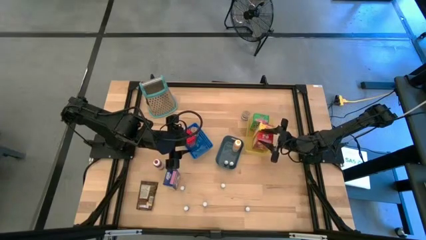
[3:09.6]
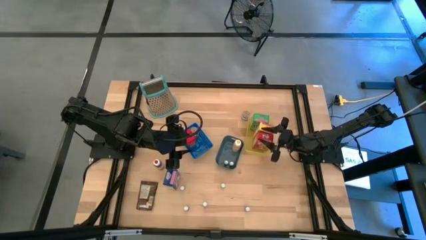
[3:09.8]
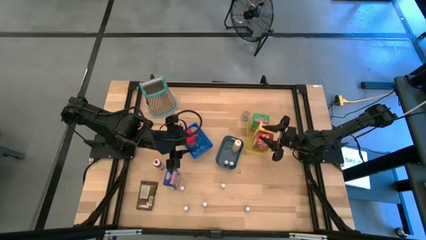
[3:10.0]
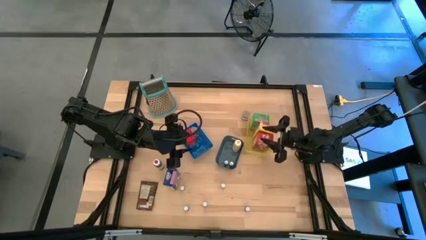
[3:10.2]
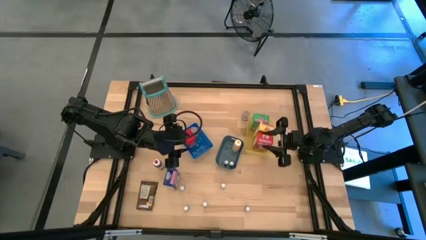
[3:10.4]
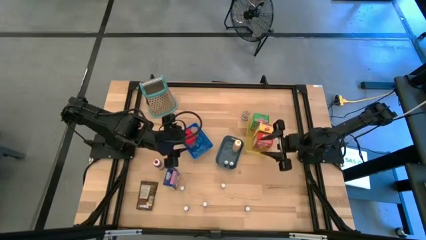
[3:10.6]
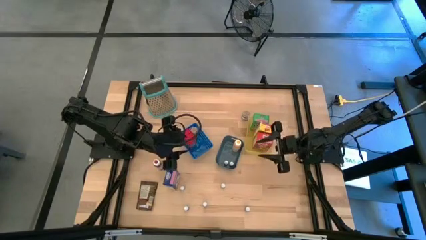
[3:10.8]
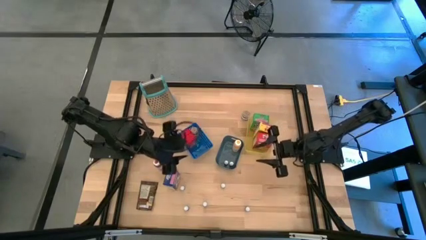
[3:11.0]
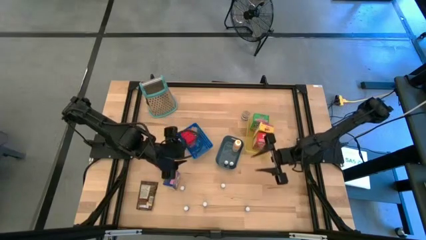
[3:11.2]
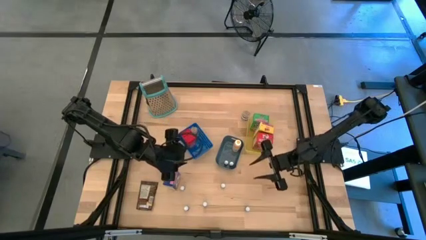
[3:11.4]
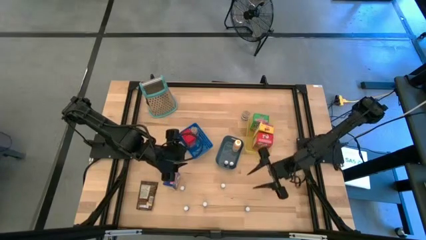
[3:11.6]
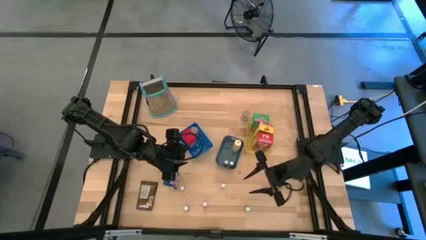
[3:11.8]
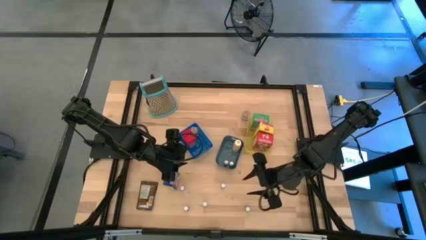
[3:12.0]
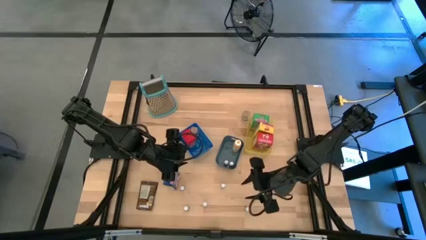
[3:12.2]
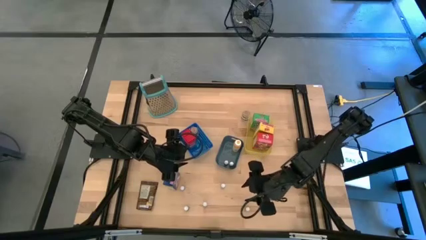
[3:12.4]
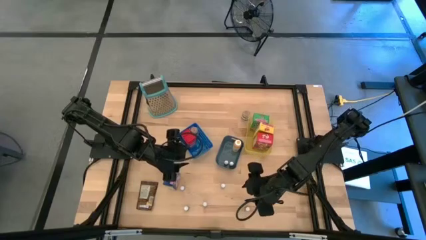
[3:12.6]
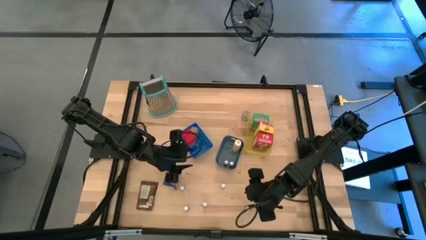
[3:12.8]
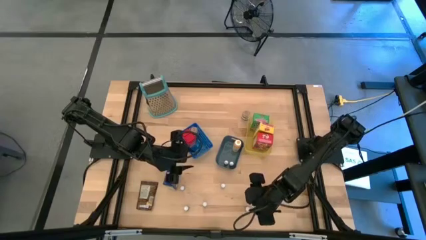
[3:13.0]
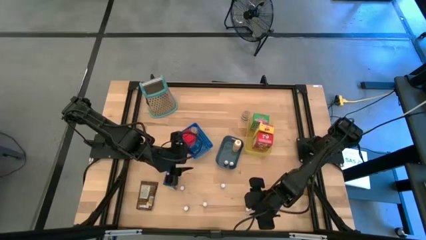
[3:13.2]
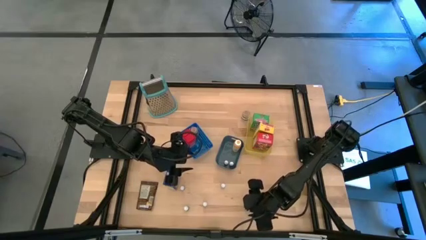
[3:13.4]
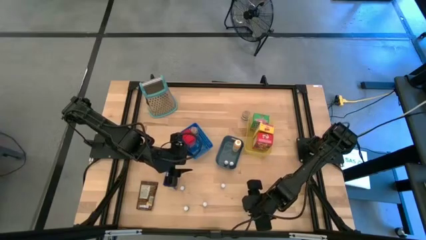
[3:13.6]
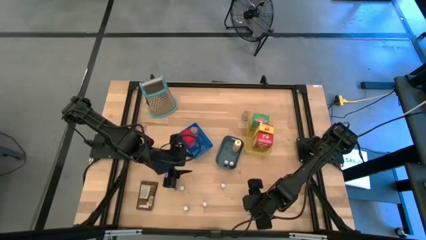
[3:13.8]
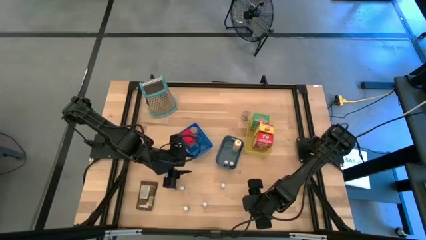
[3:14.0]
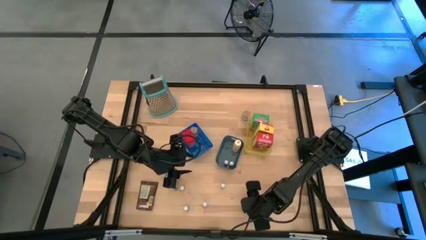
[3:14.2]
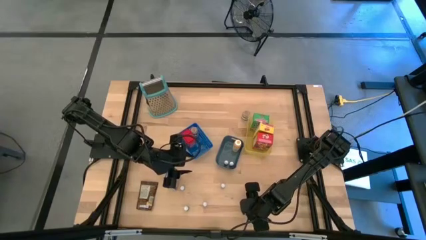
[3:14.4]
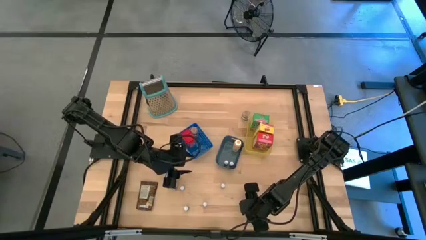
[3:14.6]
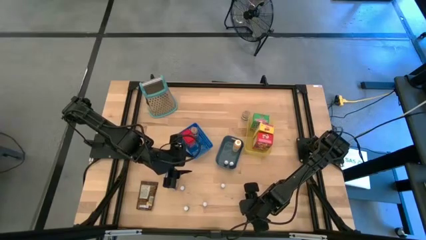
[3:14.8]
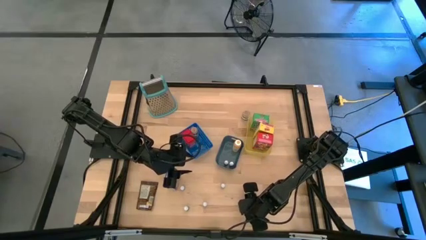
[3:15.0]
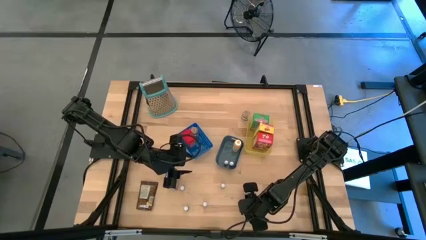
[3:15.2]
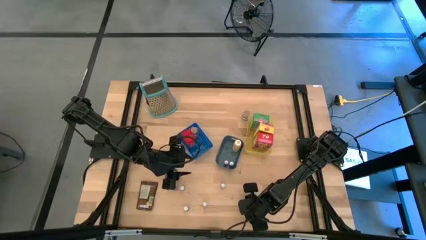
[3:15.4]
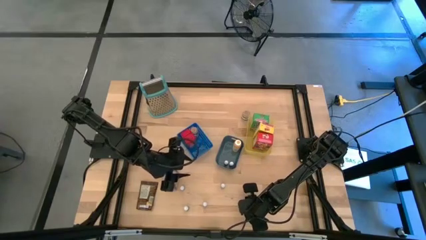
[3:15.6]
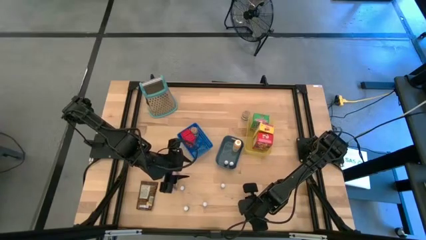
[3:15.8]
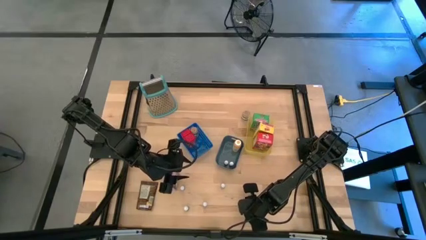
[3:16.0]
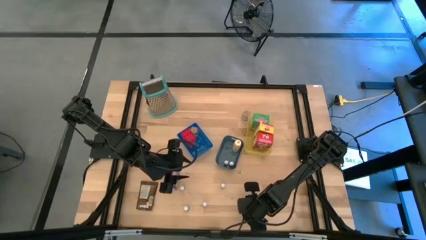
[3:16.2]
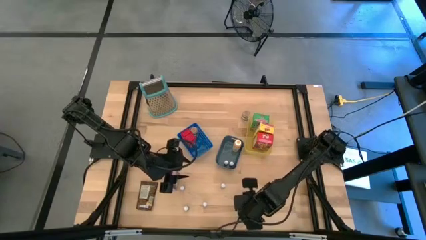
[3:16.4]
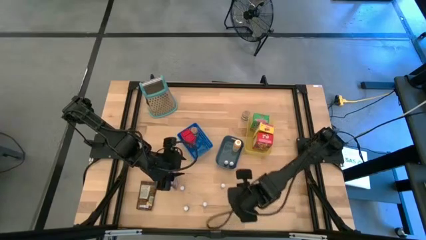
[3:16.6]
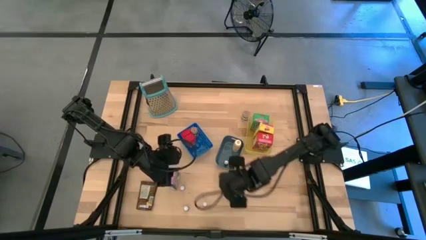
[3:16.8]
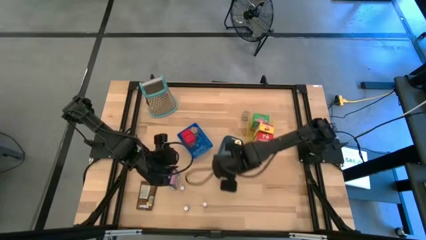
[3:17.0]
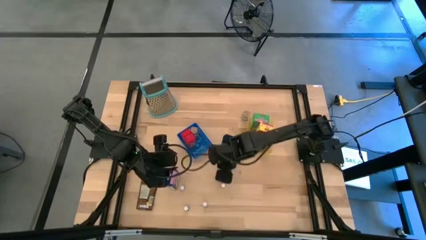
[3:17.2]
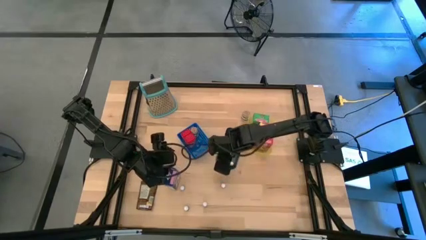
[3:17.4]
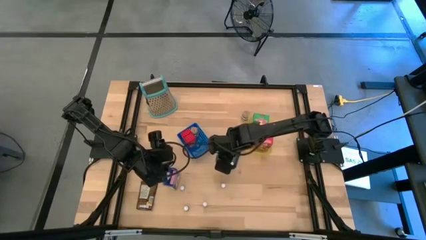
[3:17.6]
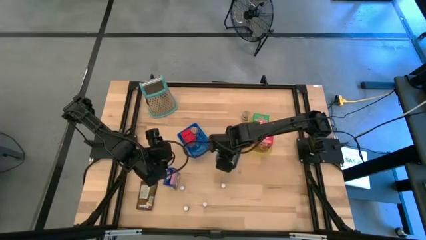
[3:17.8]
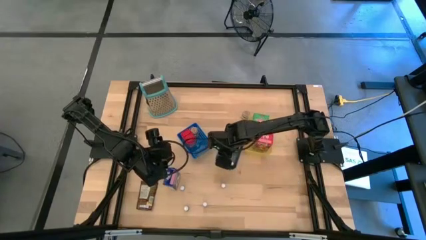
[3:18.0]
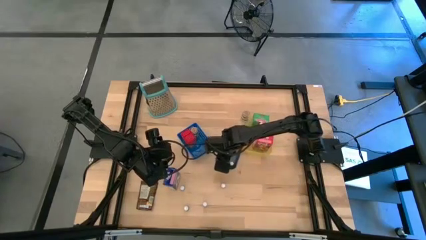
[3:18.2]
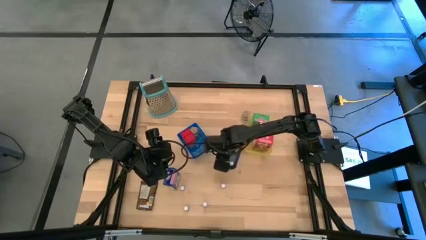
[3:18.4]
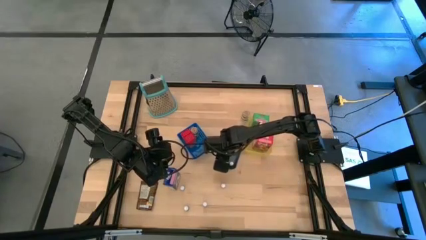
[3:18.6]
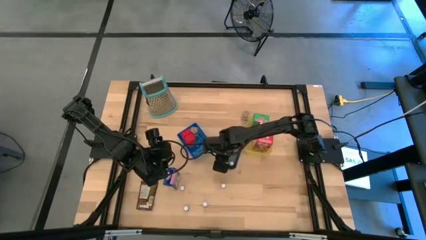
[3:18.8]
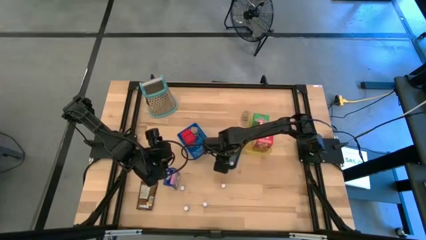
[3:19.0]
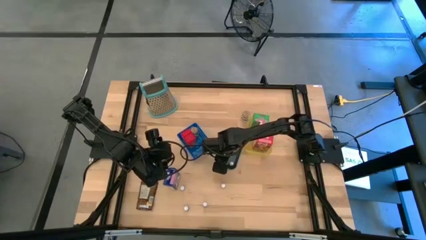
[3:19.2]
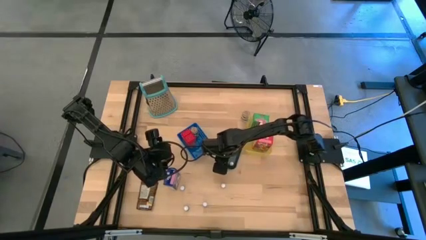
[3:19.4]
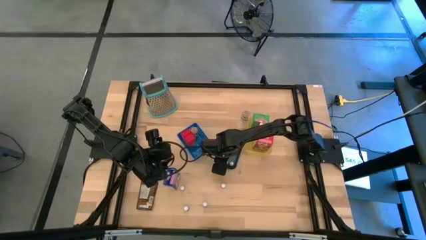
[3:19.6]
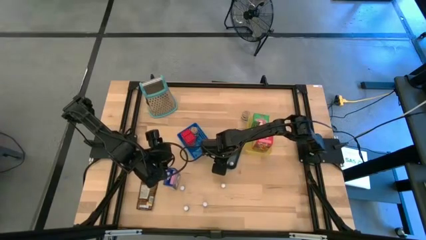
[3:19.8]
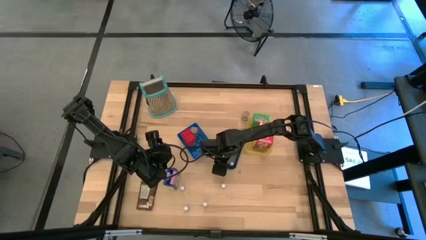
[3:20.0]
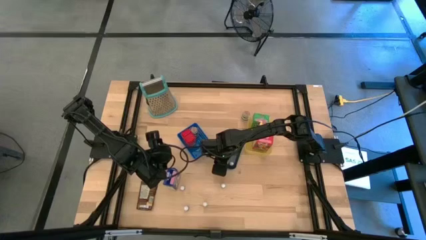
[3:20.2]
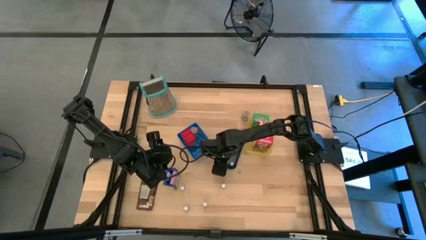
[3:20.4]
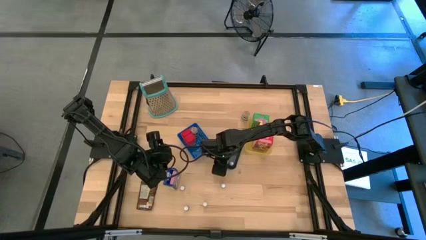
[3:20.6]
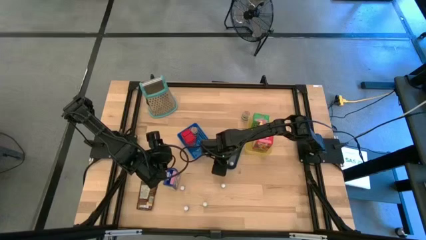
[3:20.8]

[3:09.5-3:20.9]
Task: Pick & Place Kitchen Items
Put the green food coloring bottle into the green bin
